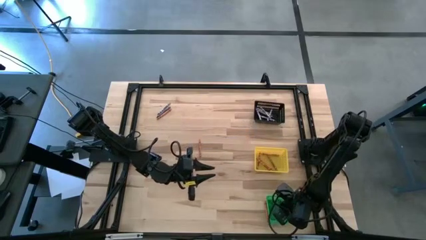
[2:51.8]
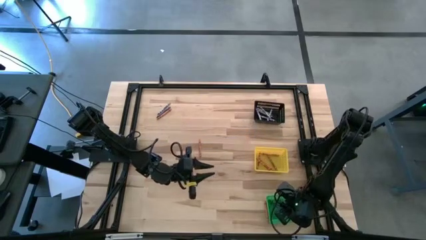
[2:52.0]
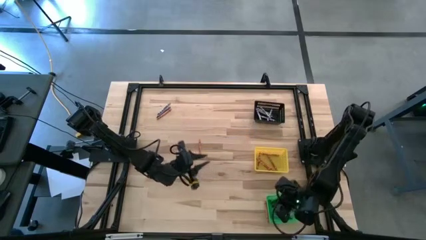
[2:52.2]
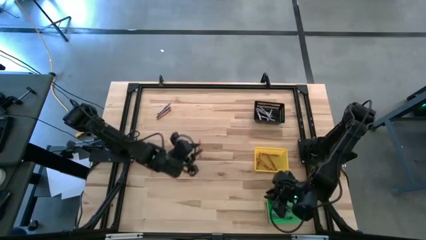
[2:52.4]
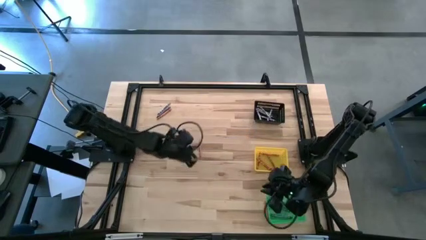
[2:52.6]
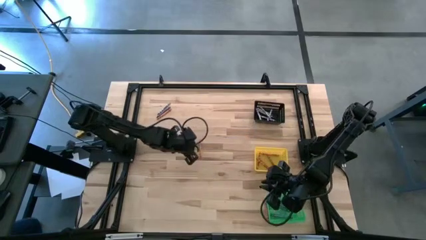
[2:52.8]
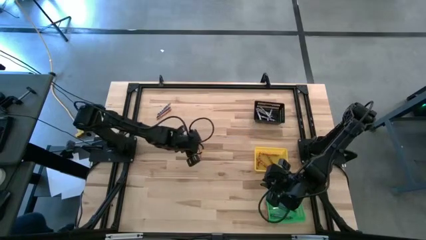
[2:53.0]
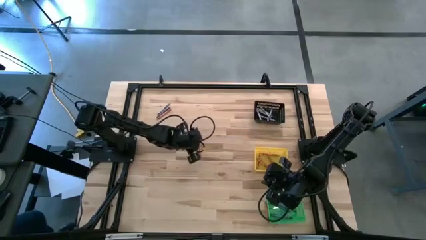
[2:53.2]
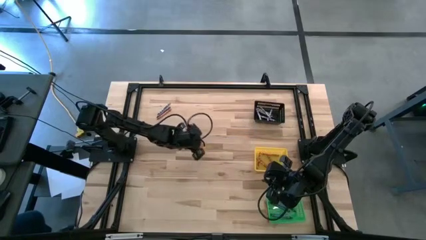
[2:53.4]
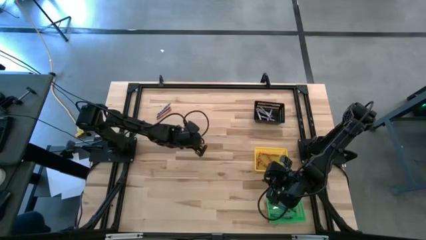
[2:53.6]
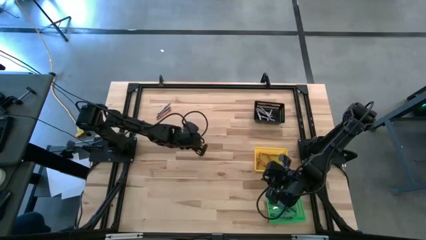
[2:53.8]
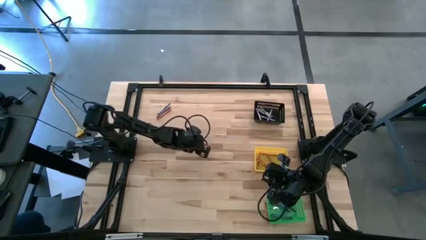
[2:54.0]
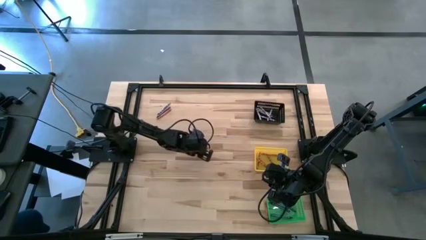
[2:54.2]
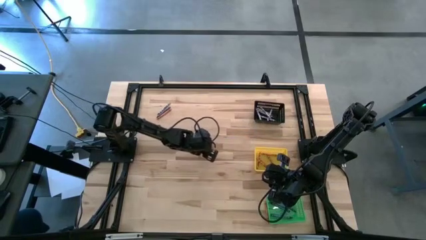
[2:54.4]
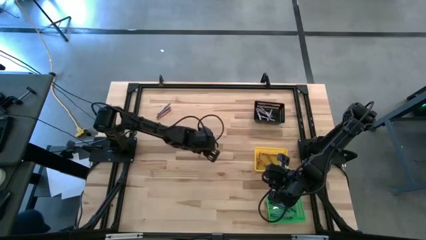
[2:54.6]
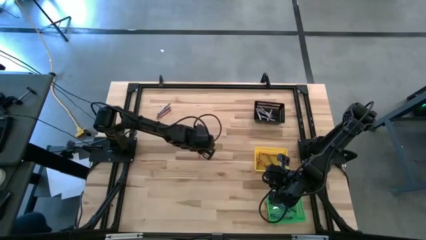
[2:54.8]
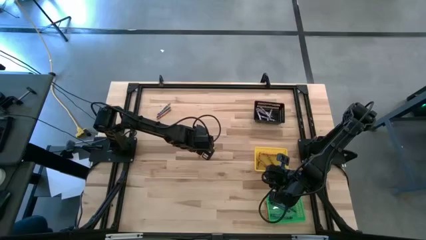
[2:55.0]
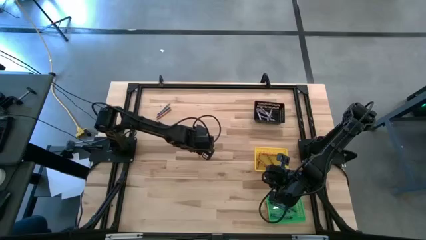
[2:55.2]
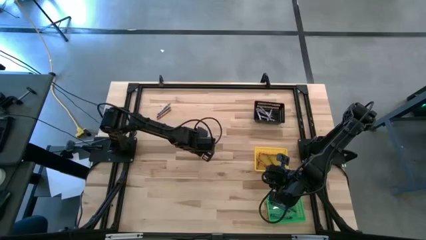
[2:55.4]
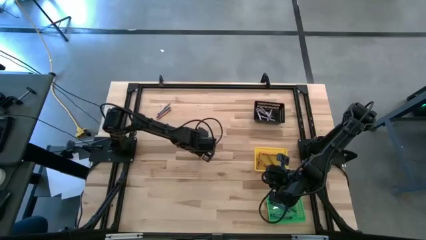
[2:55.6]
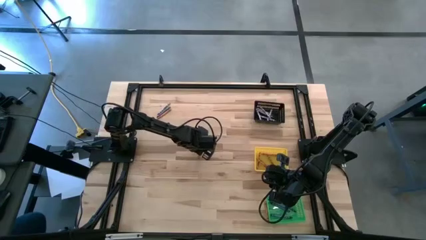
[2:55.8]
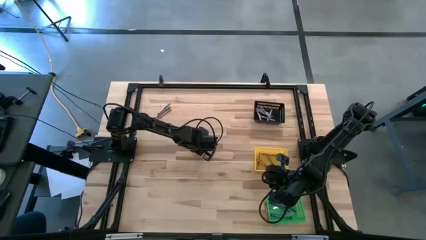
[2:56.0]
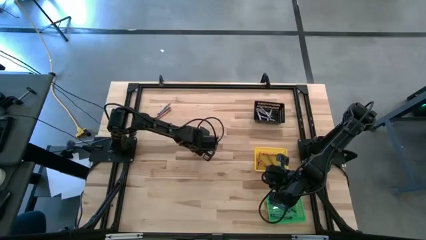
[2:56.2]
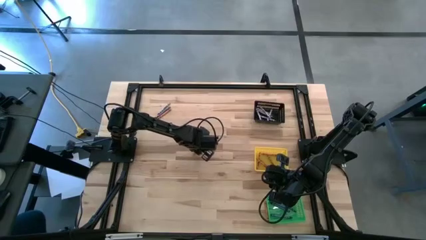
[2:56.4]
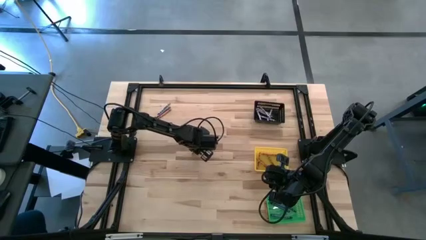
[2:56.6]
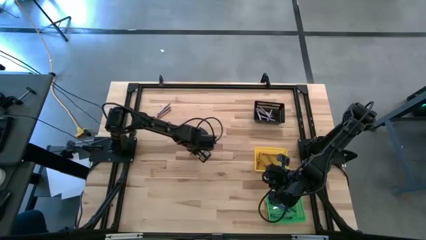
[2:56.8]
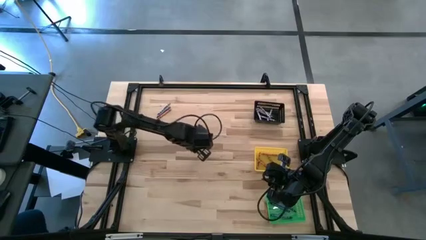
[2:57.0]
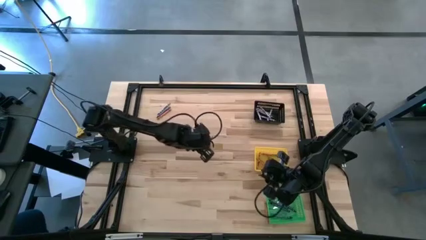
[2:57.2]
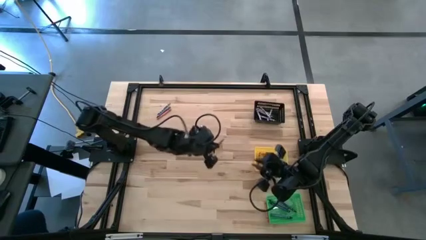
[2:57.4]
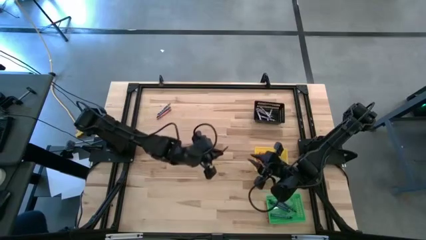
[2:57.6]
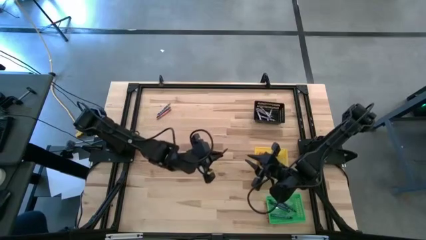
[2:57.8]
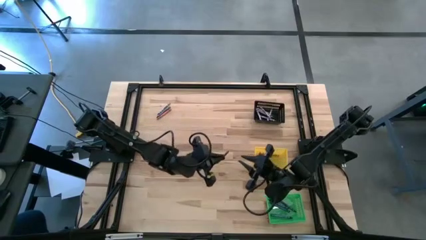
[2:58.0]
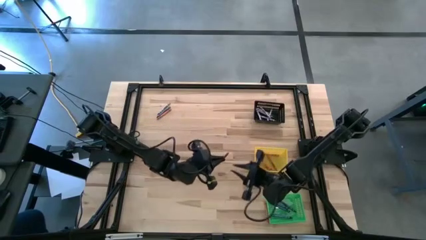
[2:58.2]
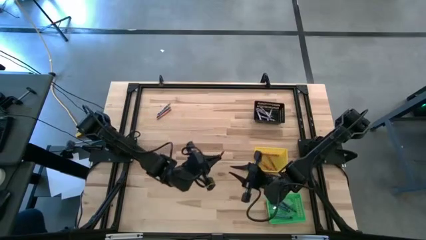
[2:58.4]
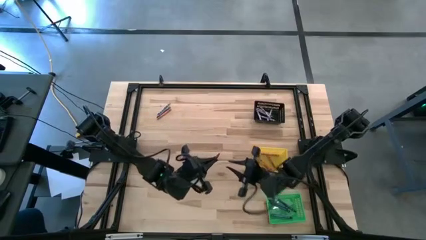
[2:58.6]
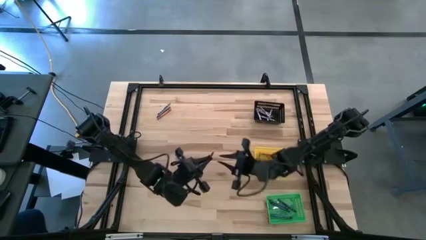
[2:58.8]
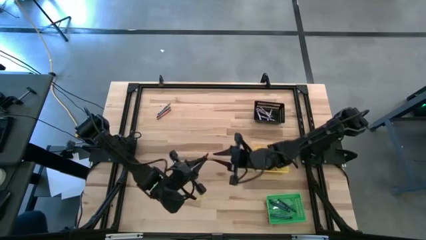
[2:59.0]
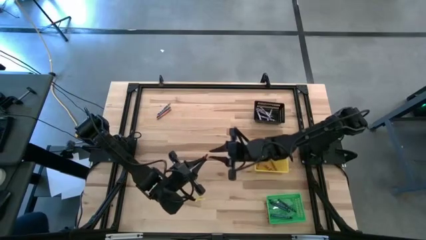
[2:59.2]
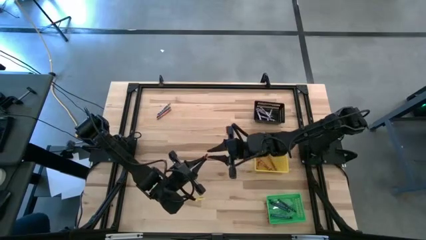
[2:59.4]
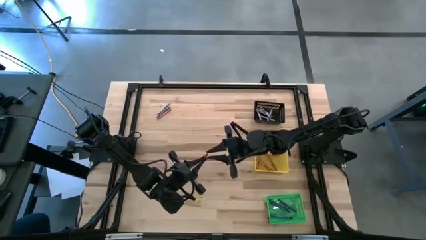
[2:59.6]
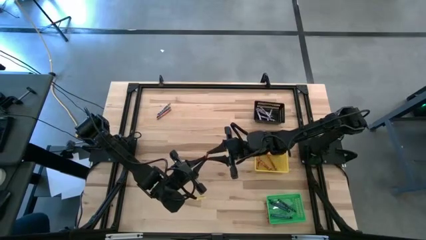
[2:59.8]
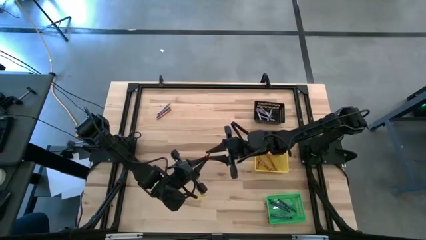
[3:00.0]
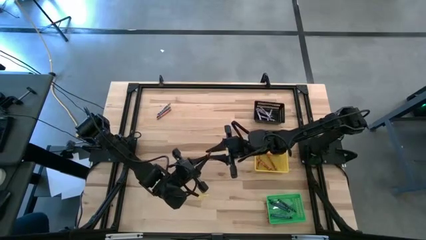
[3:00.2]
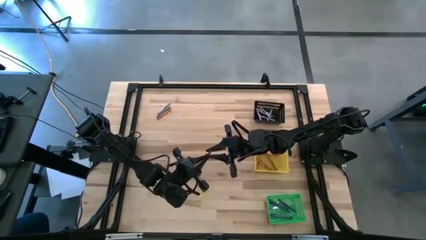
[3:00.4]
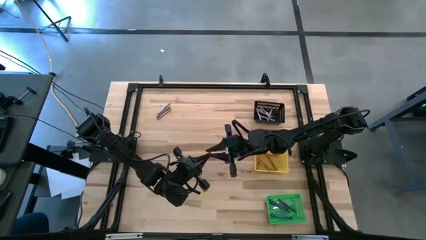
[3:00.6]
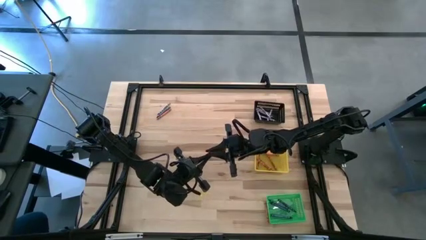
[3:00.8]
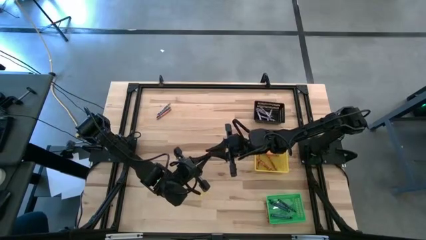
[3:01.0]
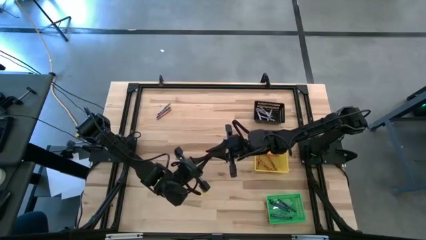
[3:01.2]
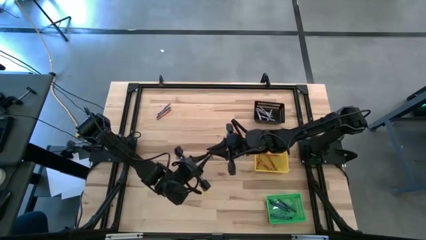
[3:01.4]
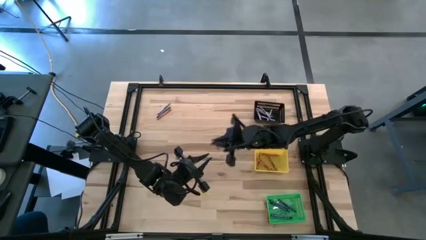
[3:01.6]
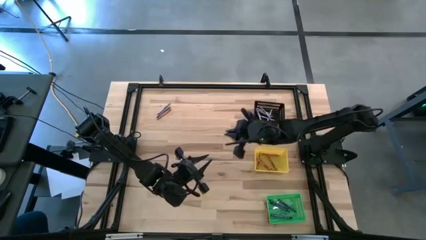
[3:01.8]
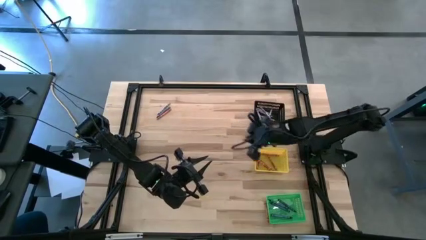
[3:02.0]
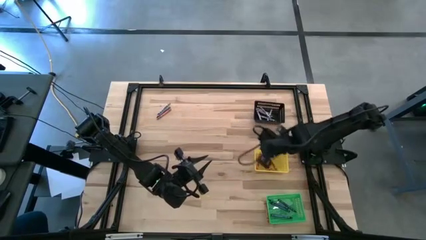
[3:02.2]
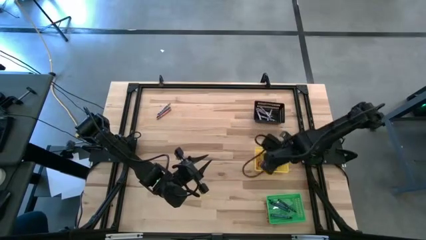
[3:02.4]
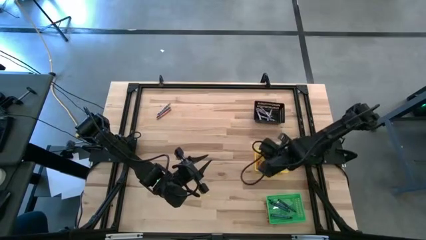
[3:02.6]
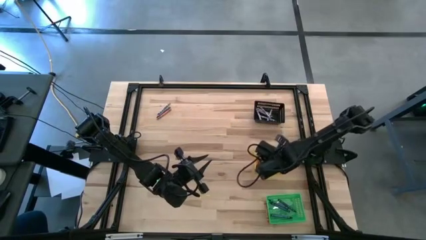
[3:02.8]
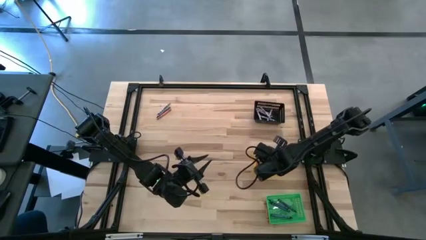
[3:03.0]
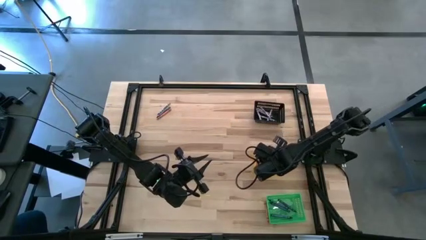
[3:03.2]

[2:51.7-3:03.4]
Task: Sort crayons
Put the orange crayon into the yellow basket

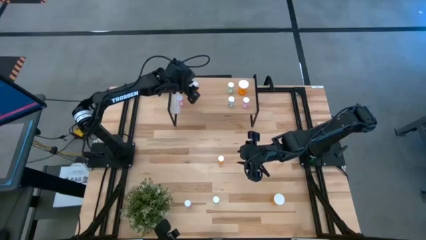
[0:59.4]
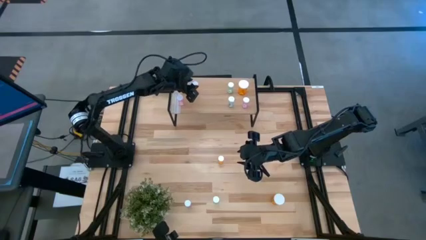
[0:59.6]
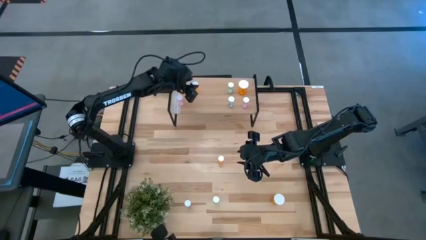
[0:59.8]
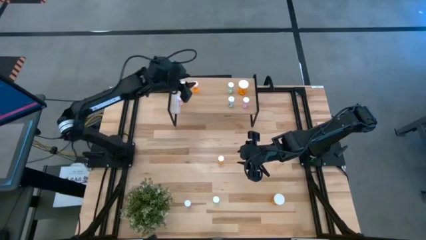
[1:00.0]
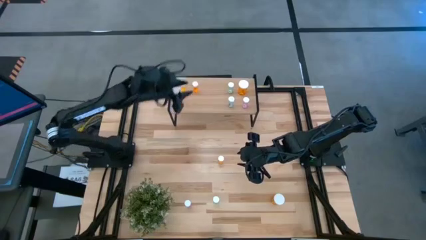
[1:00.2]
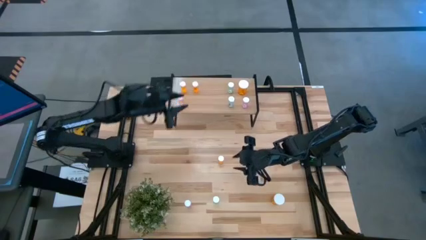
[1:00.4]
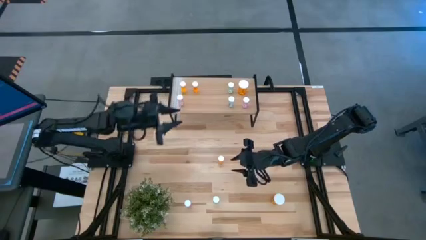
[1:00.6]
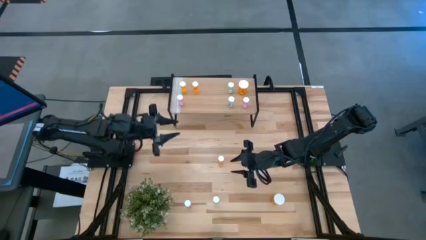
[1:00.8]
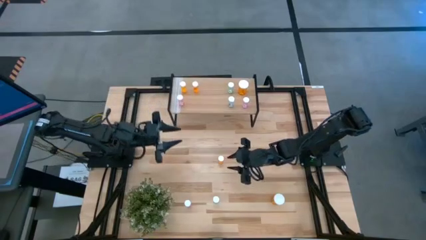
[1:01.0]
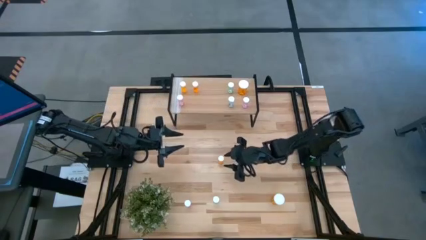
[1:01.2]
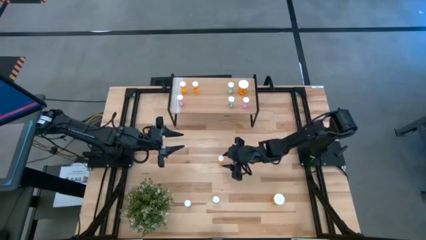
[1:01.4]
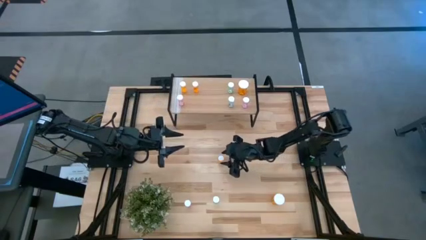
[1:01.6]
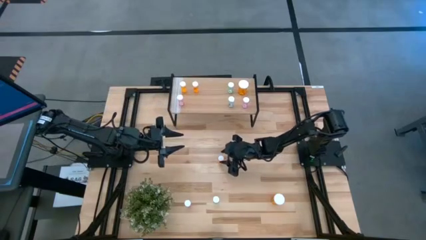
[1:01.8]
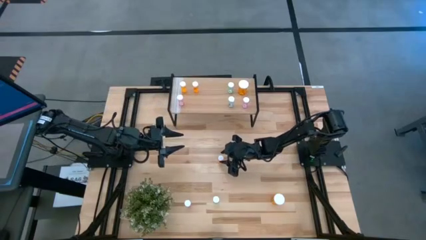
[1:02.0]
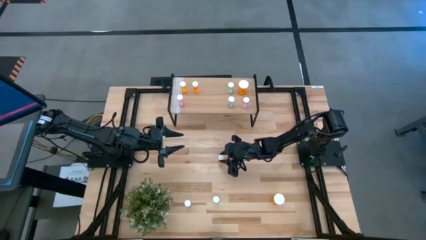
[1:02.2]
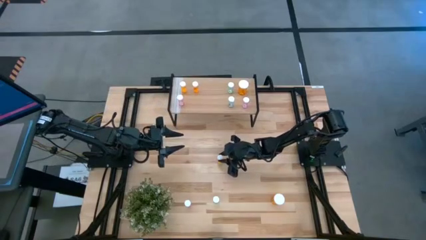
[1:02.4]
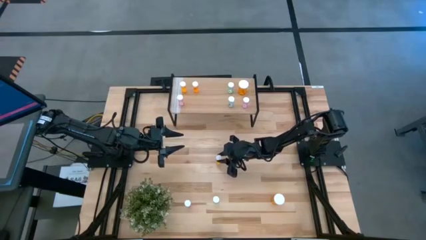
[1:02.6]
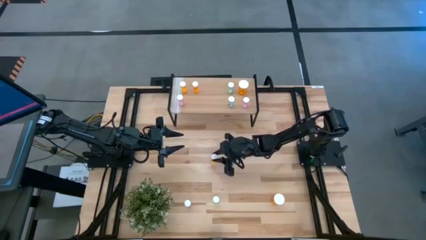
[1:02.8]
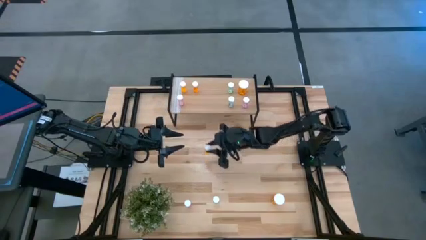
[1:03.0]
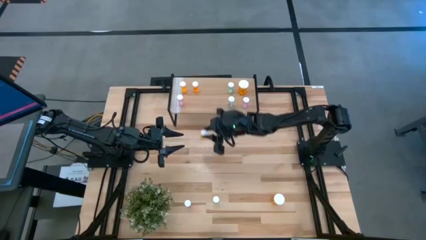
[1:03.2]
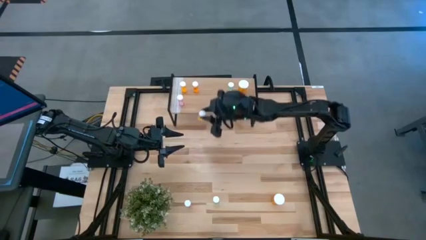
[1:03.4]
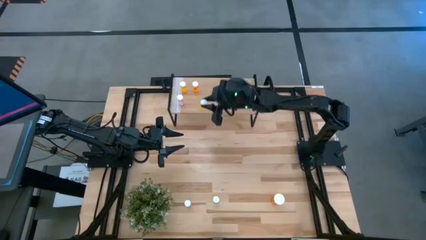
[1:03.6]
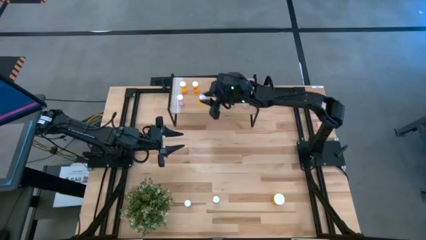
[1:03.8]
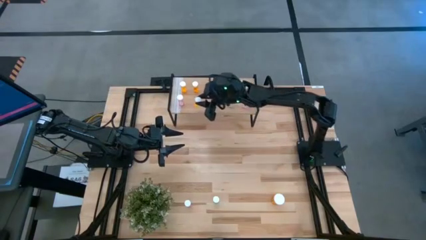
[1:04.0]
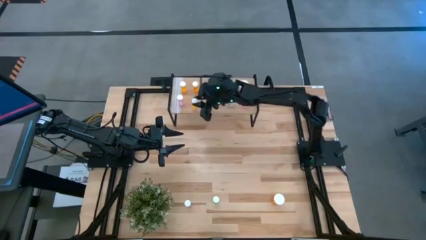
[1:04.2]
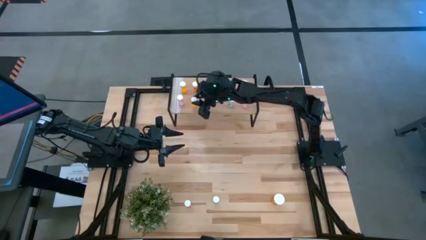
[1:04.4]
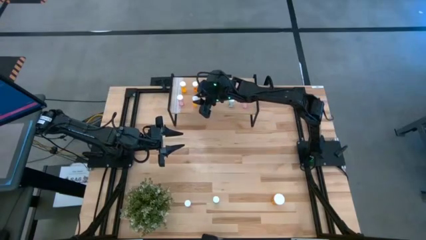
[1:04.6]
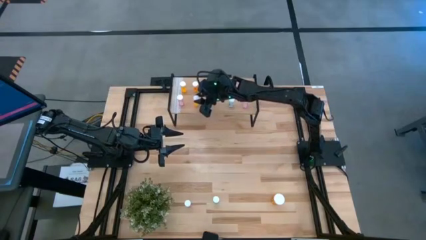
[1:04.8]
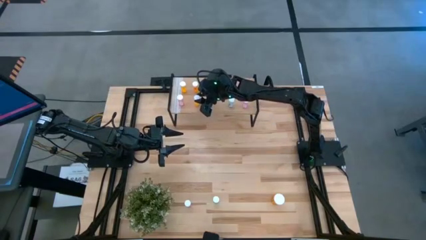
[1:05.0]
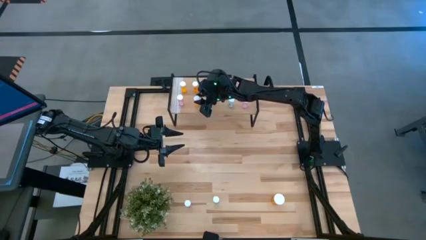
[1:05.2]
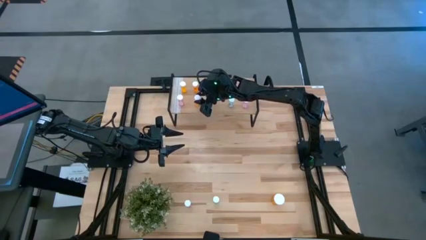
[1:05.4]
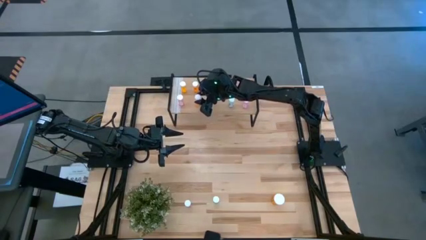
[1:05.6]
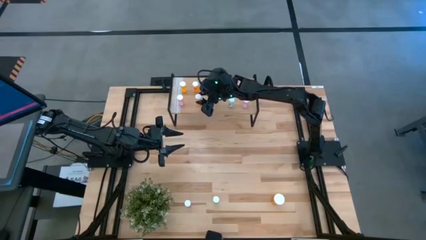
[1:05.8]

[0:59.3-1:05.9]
Task: Pick and place medicine bottles onto shelf by color
Put the small orange pill bottle on the shelf
